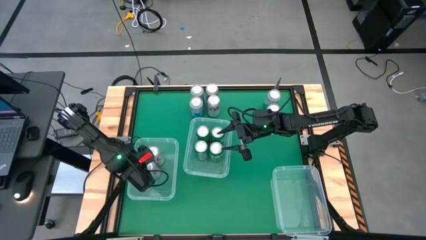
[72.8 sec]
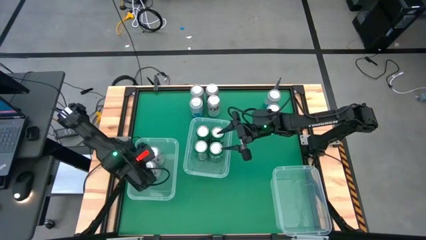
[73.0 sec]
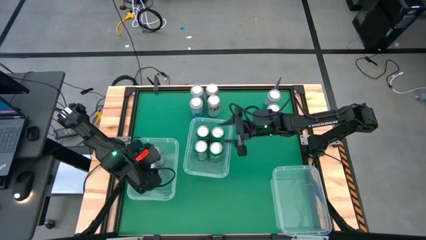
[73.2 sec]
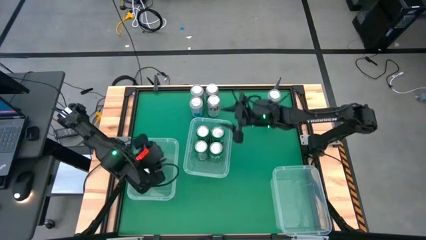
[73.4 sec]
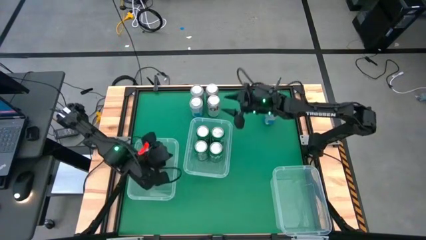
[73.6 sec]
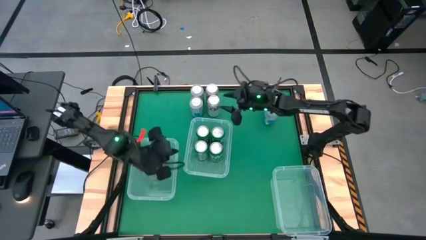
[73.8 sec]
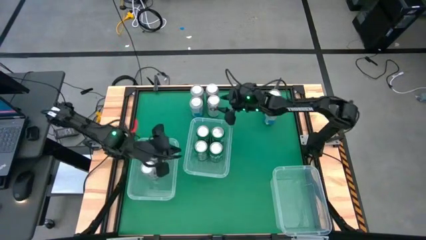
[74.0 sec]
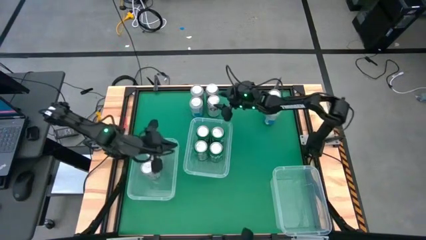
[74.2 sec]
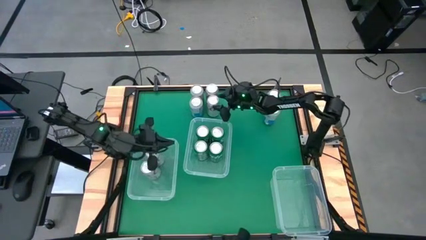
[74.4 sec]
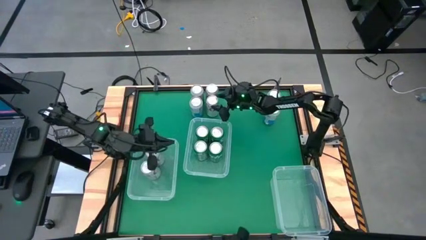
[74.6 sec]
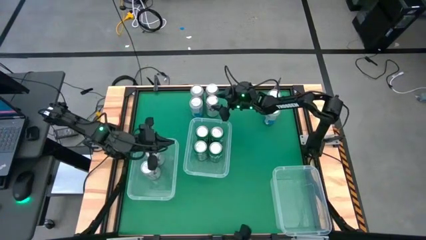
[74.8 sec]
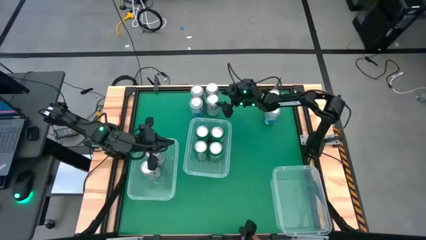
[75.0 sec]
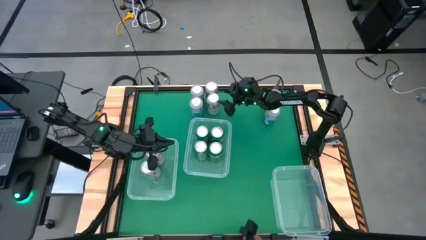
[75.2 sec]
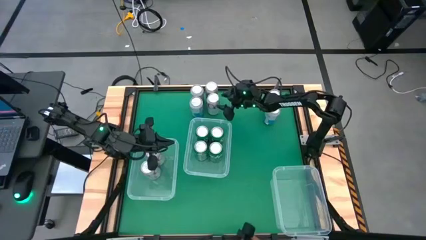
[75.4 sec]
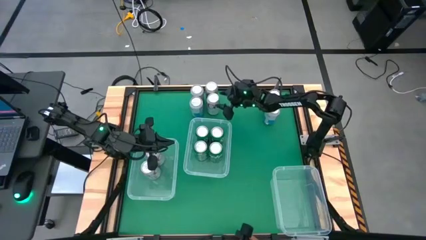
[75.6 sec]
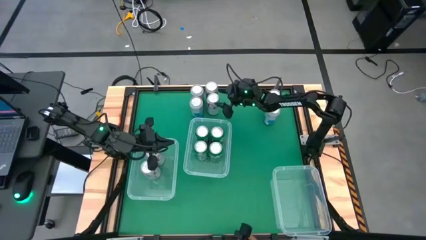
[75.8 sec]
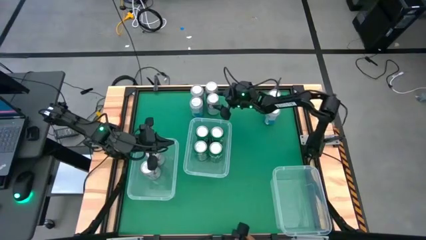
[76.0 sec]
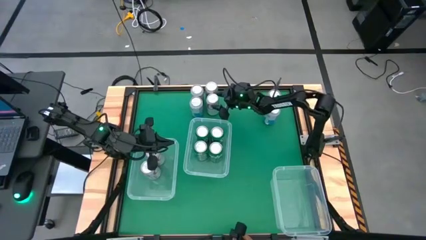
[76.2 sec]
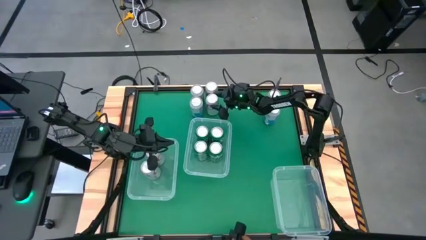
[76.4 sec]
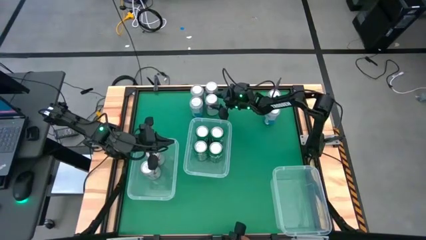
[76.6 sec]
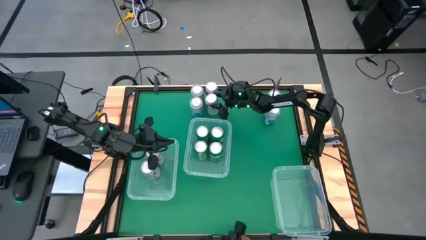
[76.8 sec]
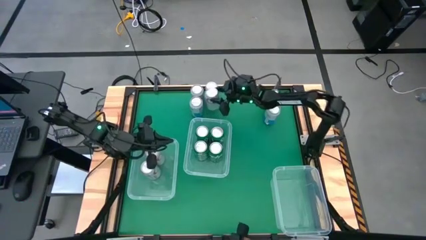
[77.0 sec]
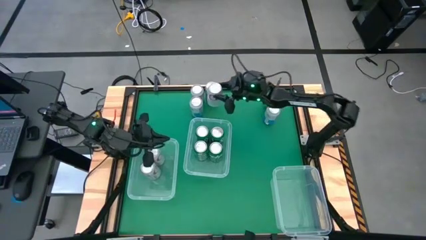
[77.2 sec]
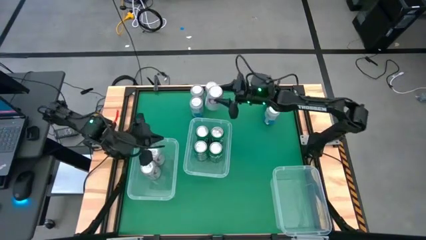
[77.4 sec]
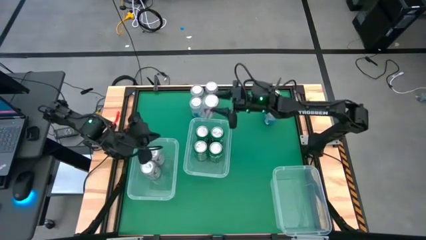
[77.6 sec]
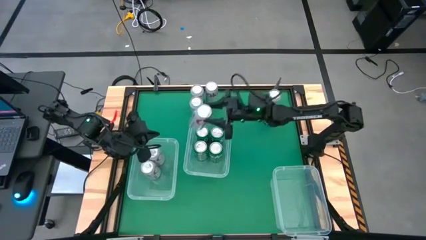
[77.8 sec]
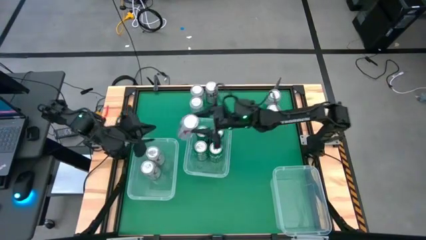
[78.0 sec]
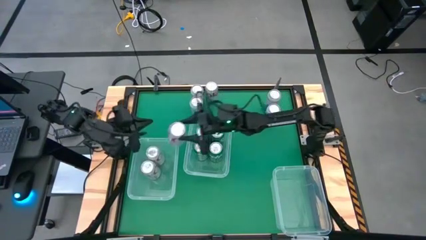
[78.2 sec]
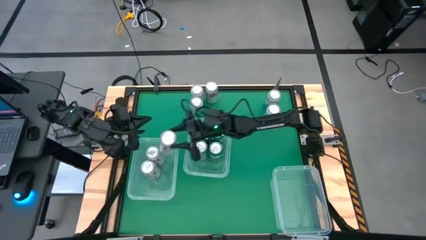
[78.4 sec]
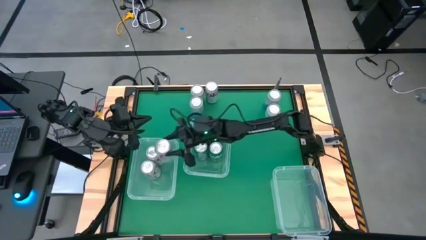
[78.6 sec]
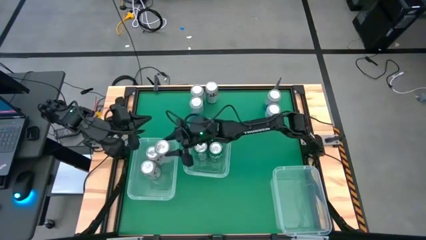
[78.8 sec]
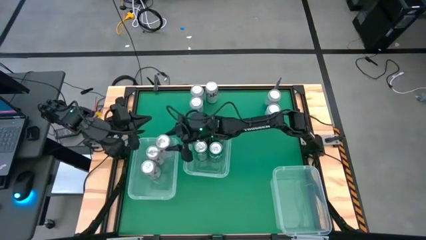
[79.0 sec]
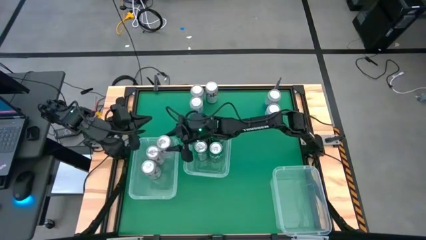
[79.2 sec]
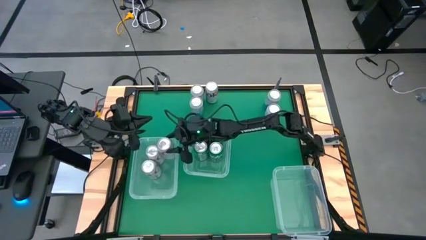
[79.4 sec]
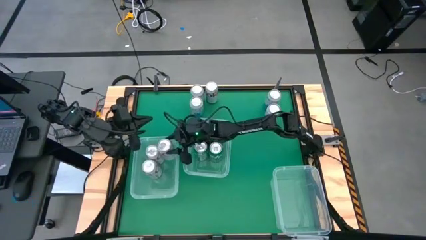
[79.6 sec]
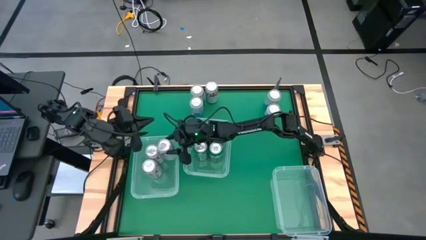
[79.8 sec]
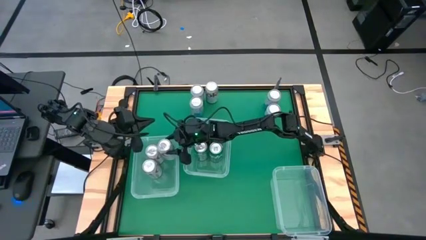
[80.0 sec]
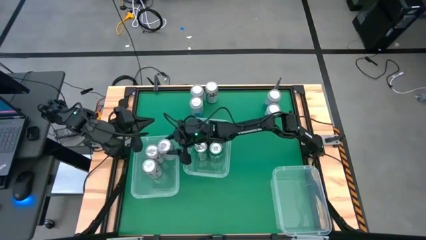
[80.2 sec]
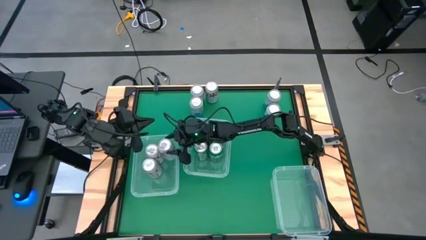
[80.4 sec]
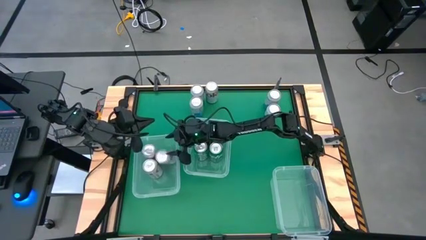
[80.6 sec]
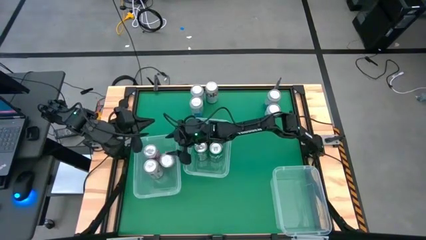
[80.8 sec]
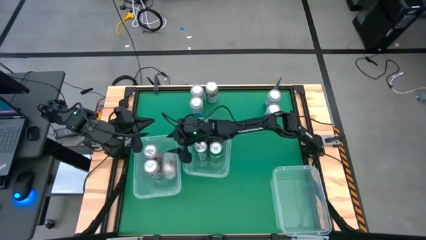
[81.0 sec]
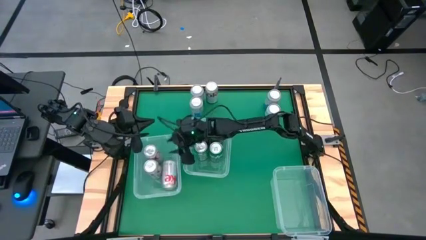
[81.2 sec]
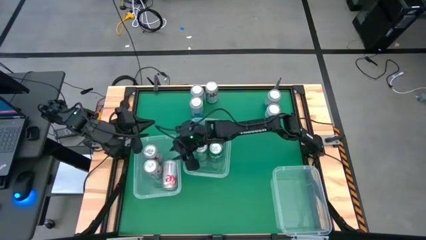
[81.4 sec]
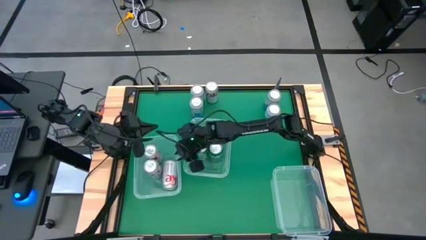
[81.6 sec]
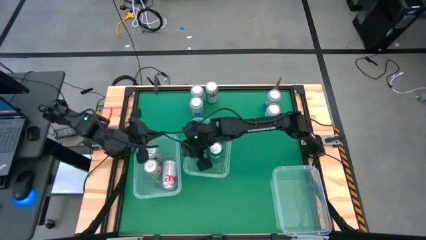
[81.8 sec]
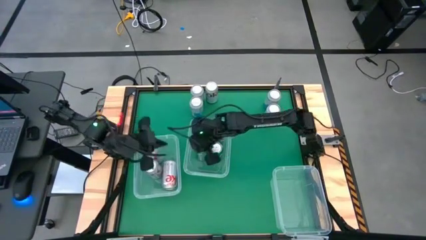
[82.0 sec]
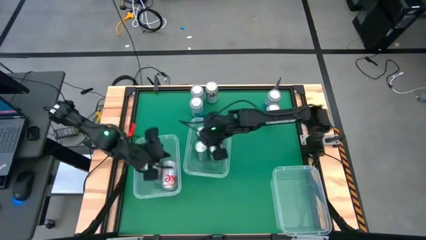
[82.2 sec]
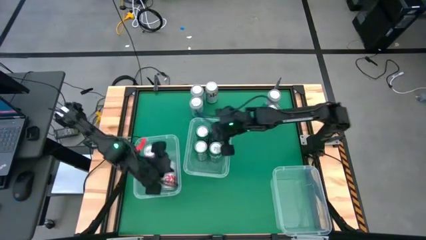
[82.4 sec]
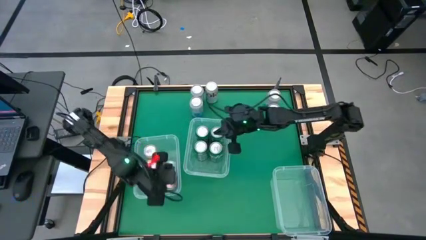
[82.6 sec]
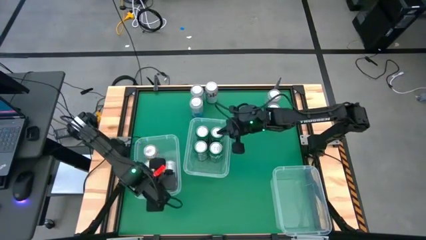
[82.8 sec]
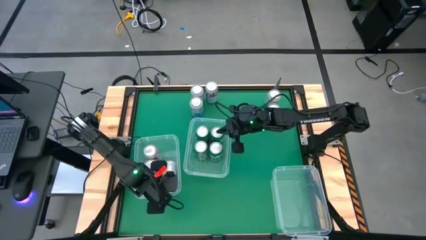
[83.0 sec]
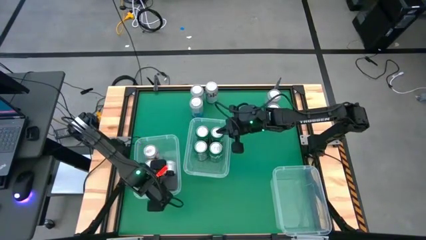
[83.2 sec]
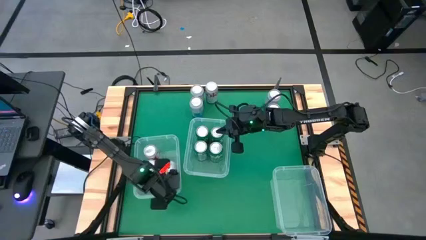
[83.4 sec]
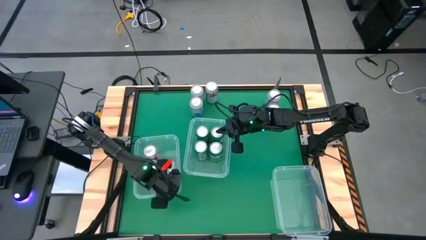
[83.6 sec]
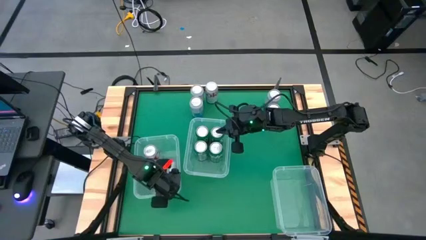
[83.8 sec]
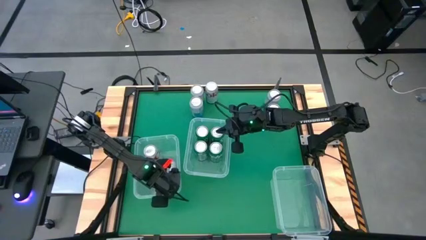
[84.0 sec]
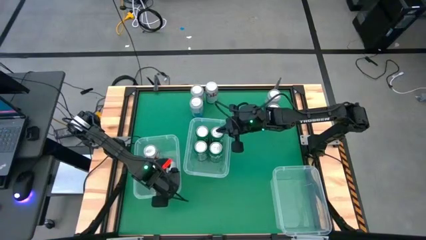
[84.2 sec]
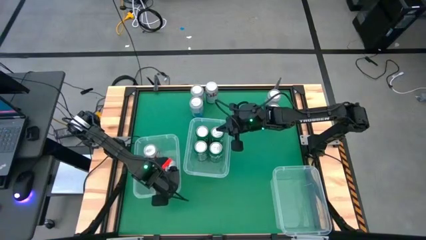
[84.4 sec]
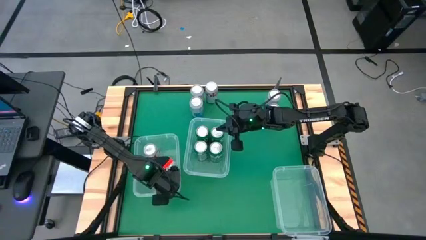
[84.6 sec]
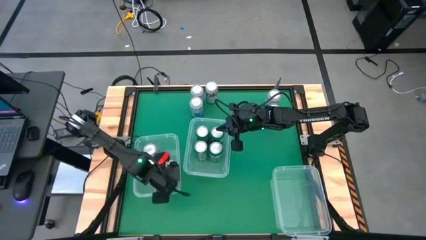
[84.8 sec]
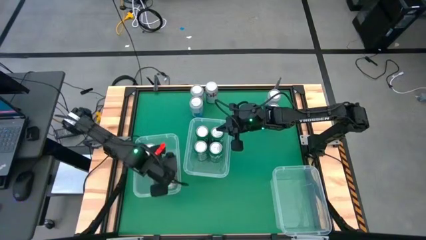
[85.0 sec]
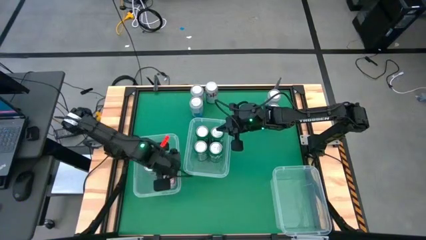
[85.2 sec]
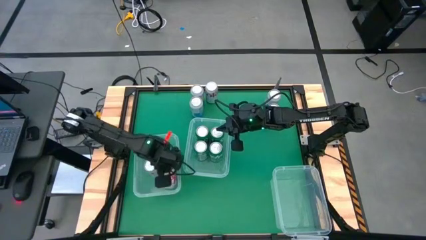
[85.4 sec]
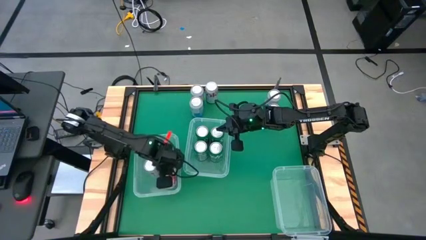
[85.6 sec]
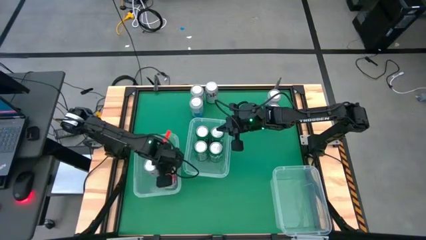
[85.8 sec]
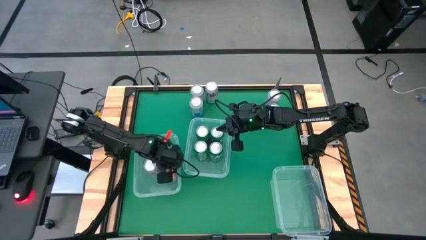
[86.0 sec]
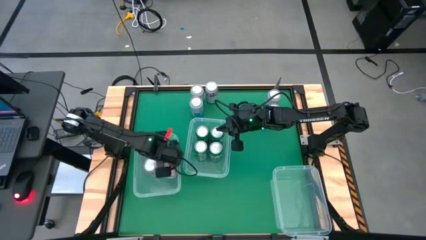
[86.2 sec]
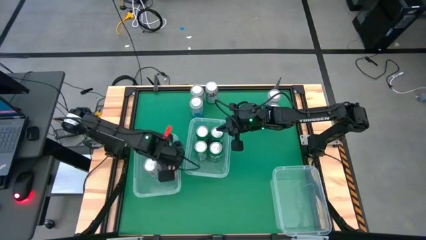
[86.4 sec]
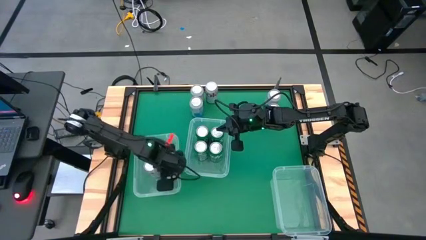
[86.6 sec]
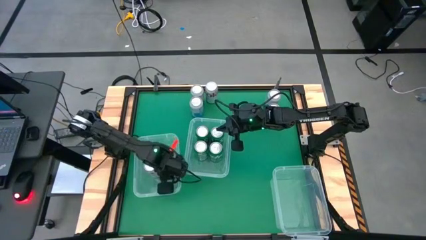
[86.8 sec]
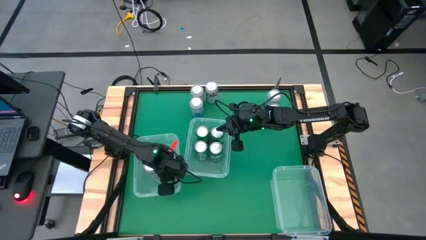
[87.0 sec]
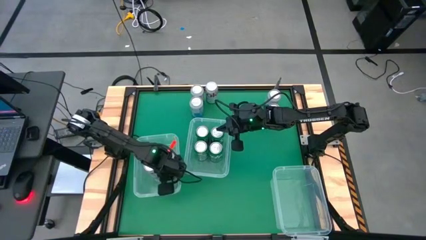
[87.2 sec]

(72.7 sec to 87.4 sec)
Task: Sort soda cans
Put the silver soda can into the button left bin

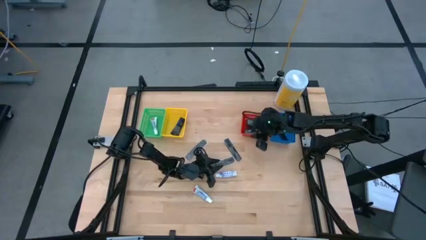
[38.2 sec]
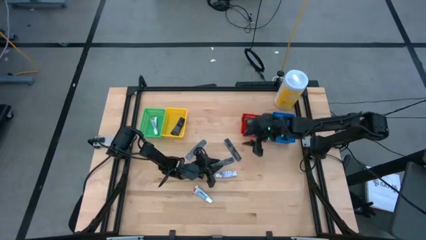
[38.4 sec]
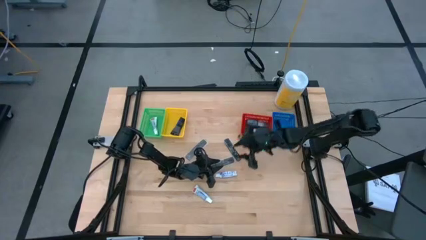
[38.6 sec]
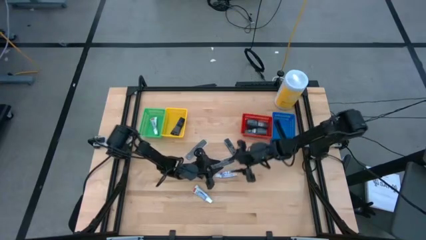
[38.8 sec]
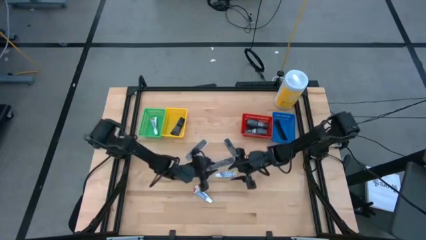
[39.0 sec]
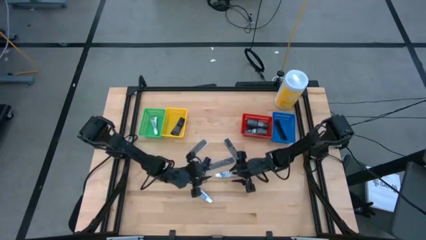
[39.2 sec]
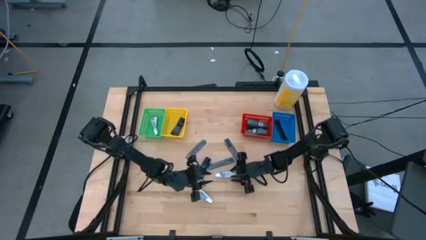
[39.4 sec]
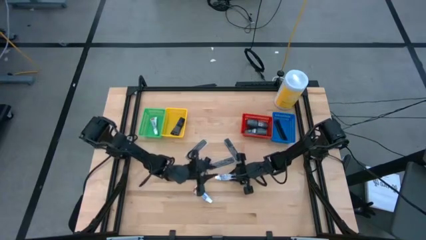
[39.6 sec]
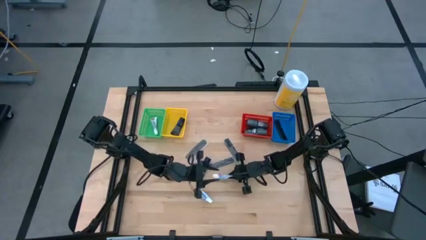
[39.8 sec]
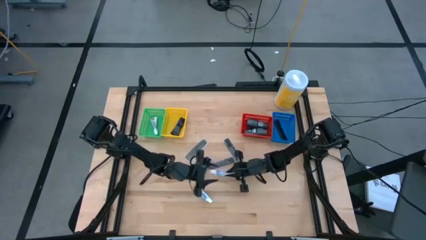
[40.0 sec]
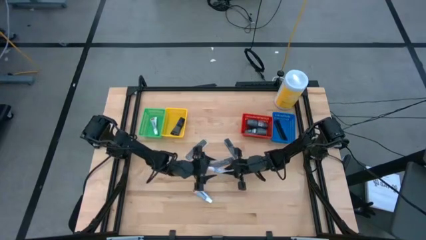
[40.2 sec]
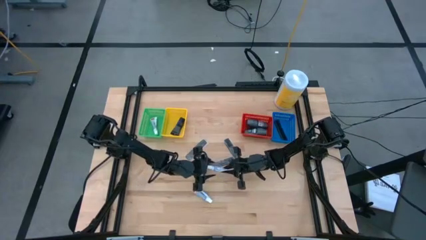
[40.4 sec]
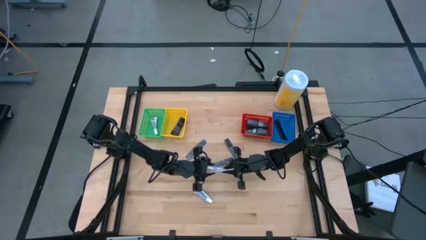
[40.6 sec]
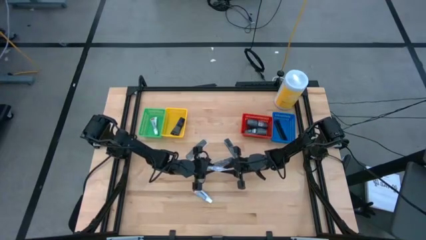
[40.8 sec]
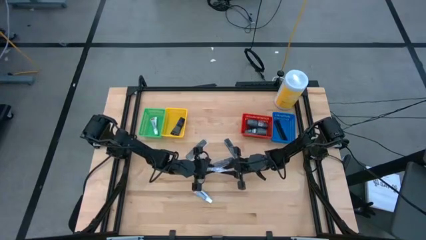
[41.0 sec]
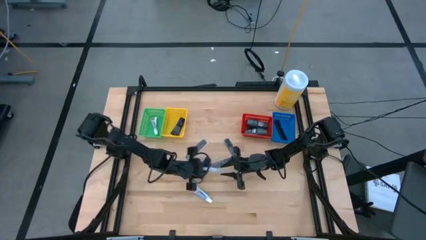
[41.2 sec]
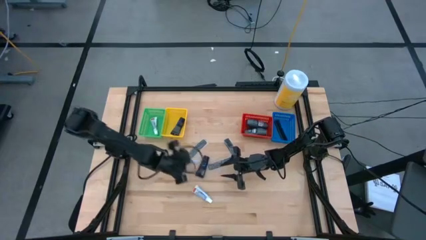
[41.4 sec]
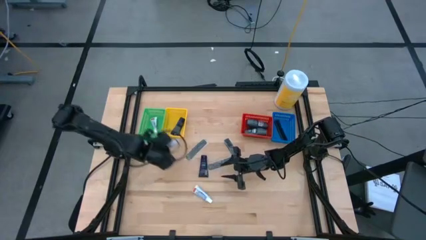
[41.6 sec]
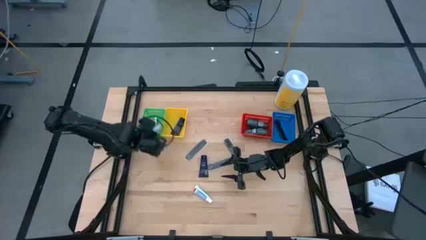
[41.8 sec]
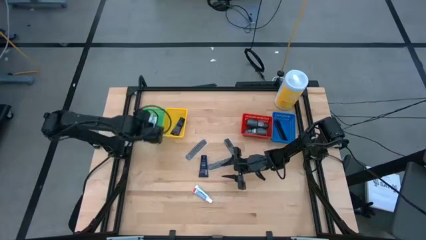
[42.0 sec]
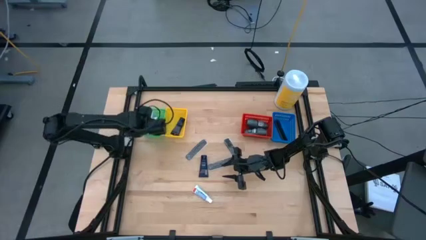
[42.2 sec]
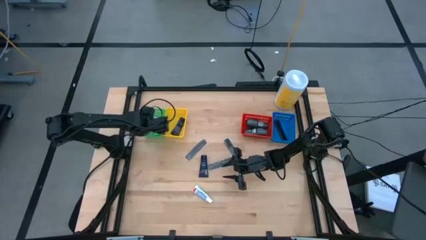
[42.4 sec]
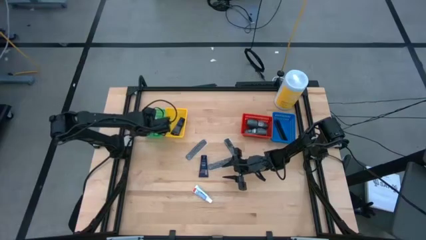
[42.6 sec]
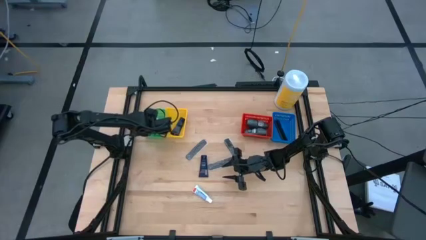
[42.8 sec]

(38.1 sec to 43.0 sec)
Task: Pick & Place Travel size toiletries
Put the toothpaste into the green bin
